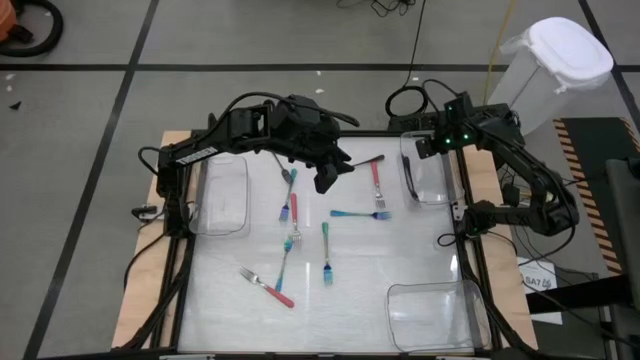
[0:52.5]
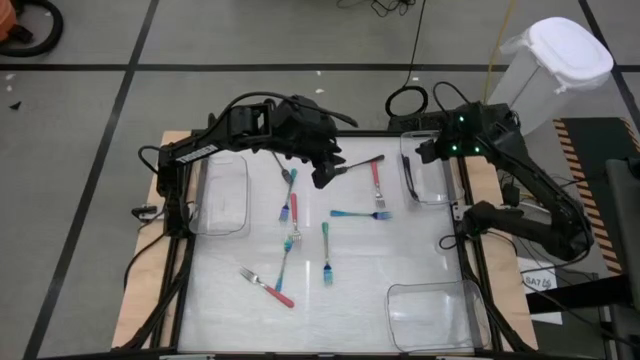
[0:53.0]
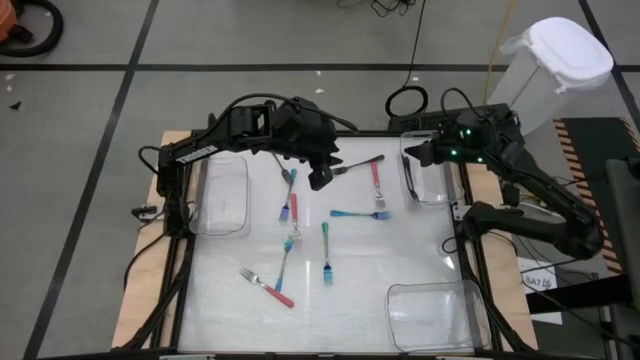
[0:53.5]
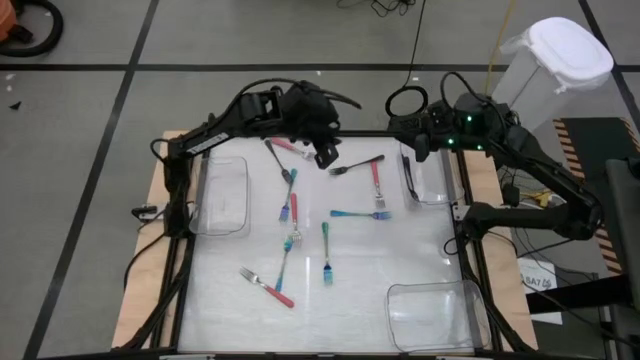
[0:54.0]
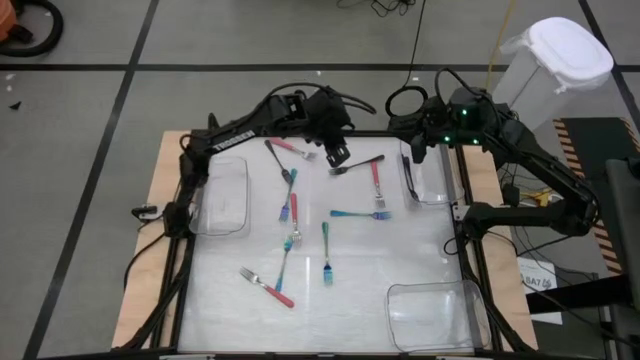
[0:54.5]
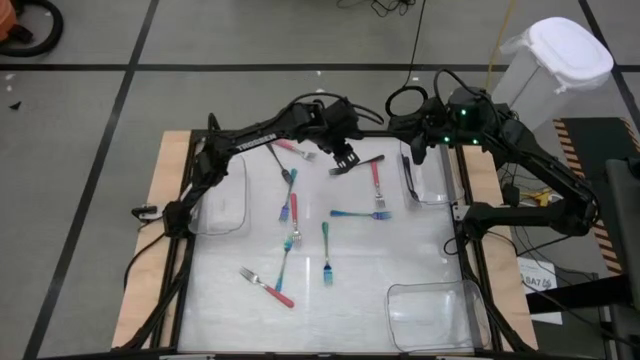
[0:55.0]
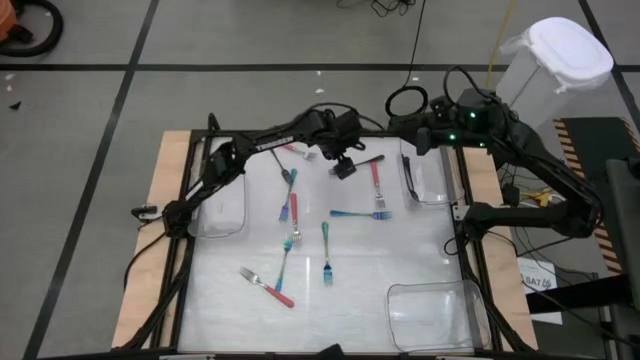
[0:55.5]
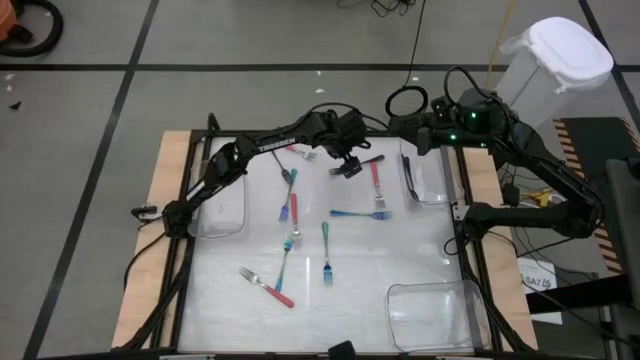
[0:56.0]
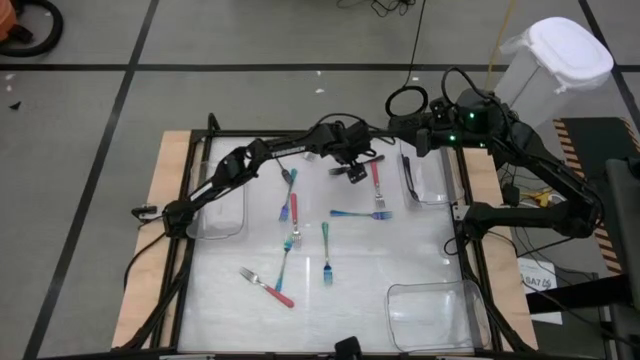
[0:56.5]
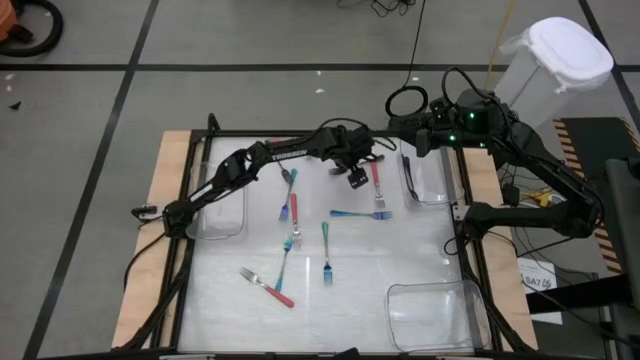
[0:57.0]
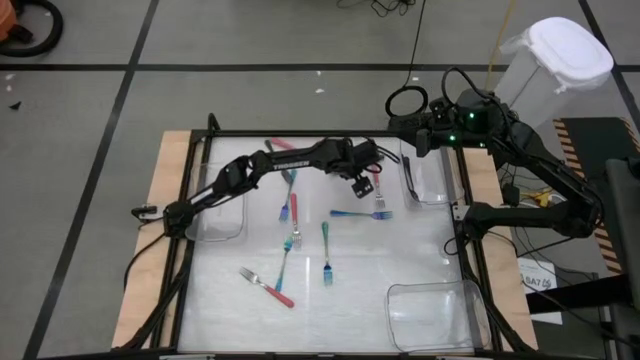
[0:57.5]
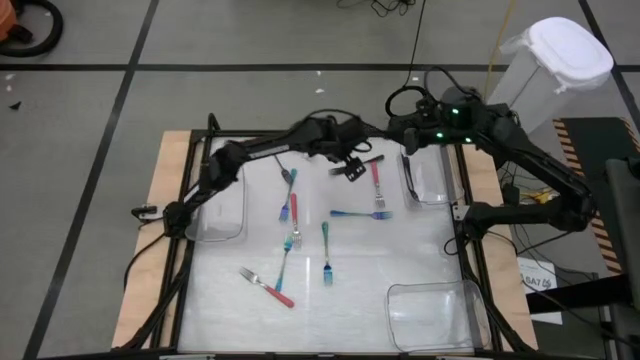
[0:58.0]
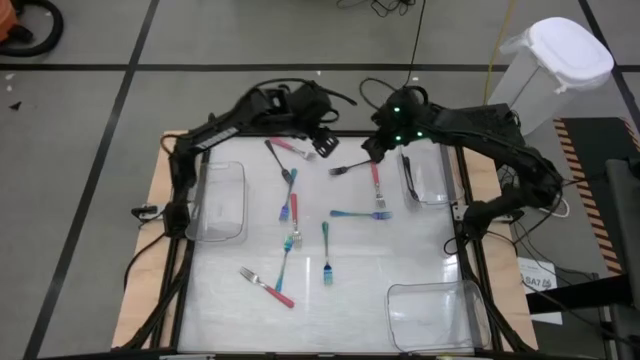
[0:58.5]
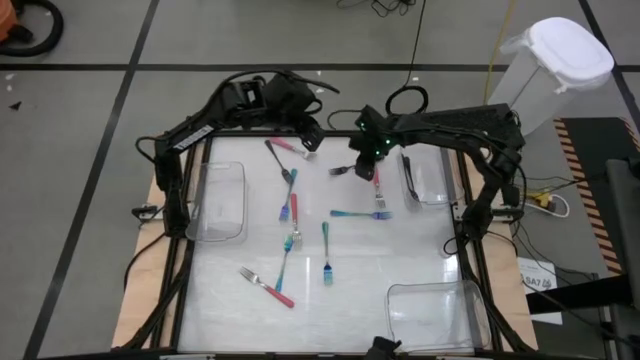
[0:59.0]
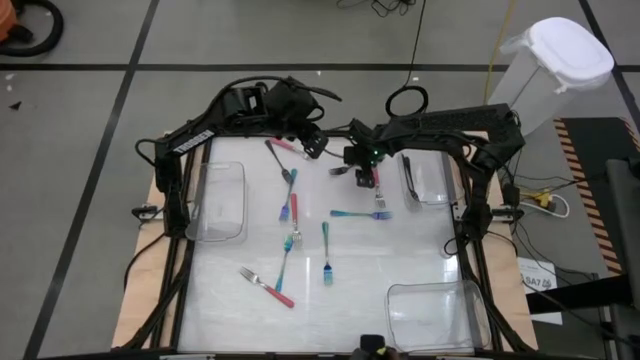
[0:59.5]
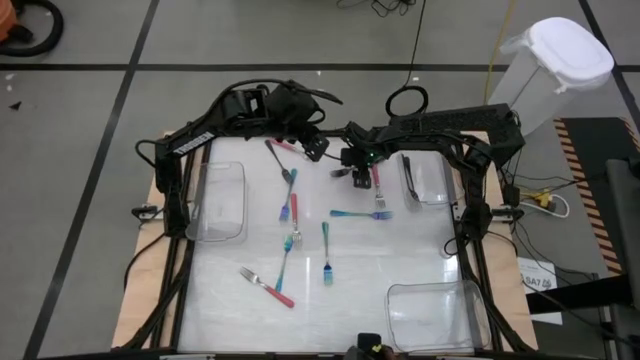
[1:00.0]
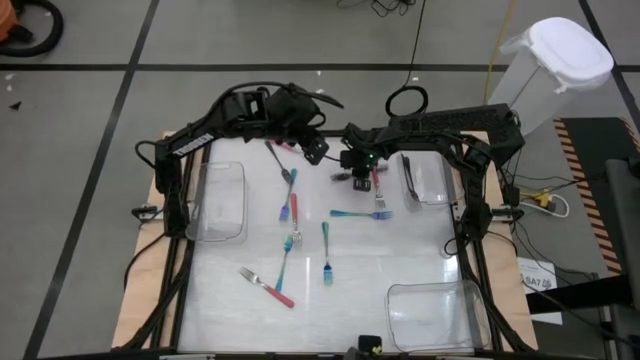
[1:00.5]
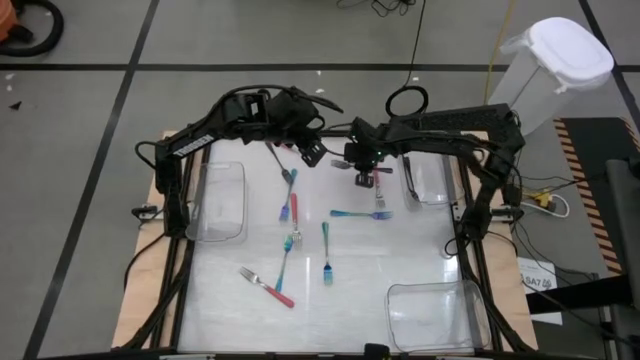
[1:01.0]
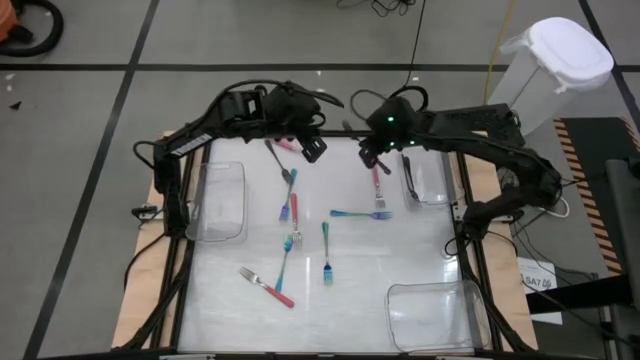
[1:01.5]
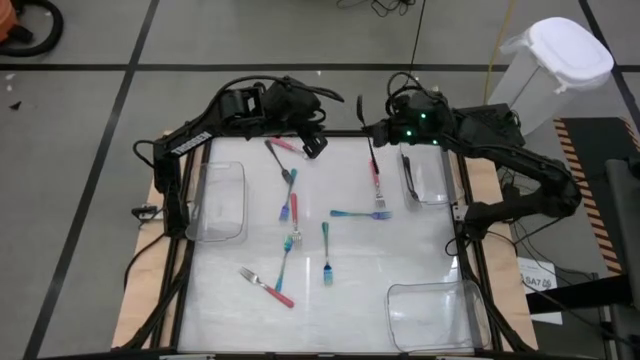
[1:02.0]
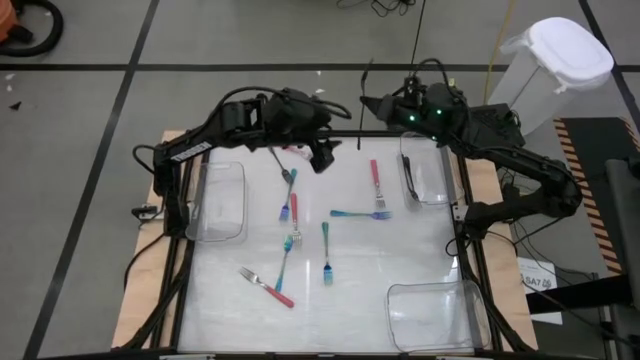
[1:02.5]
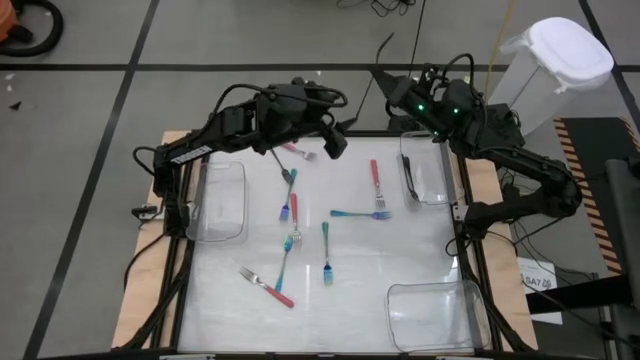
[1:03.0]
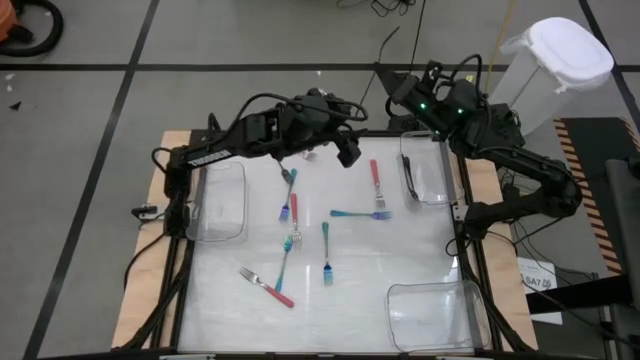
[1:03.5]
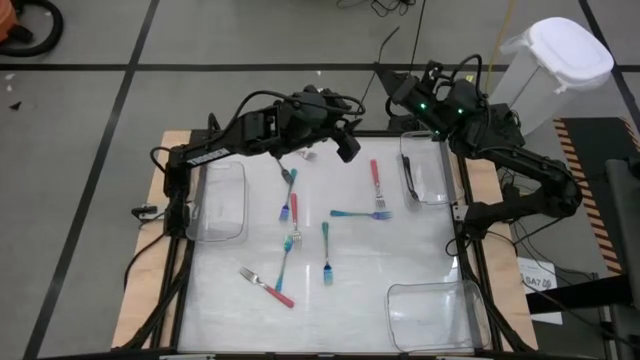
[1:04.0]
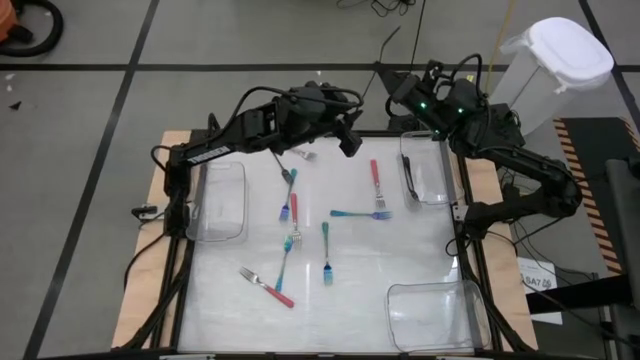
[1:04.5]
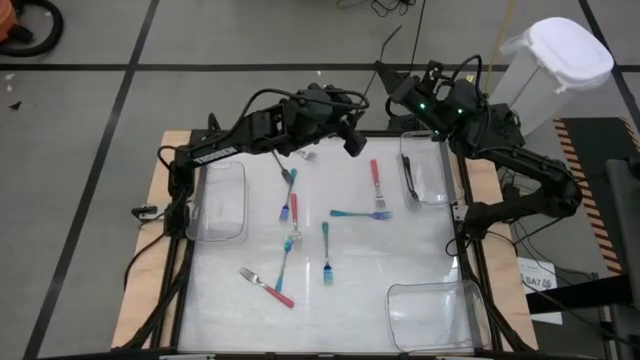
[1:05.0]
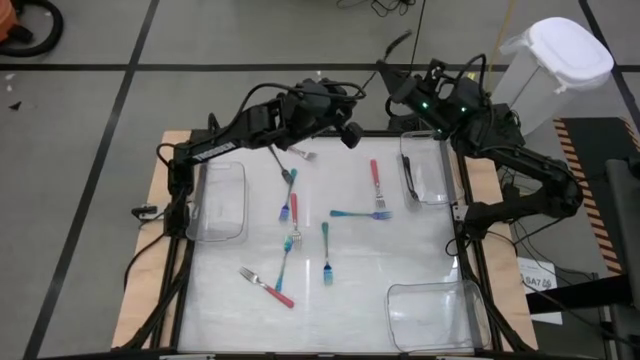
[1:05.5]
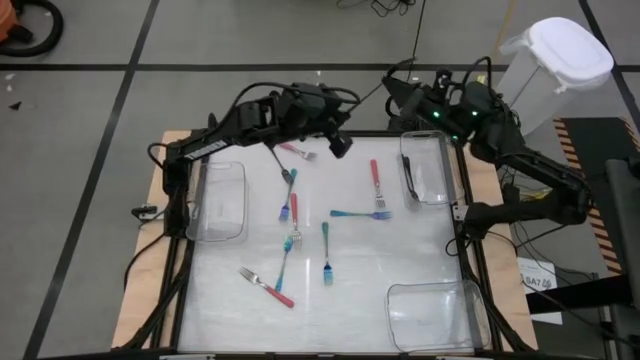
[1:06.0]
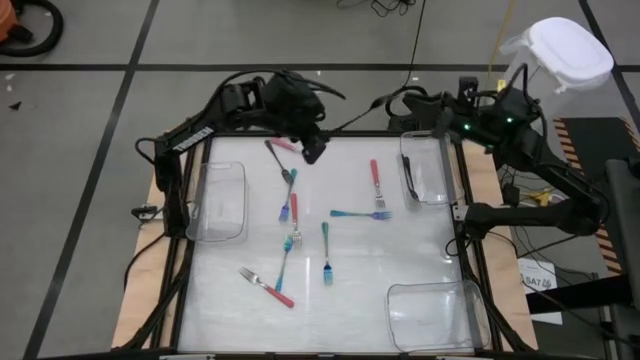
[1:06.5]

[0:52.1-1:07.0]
Task: Sort silverware by color (type)
Put the black fork into the top right transparent bin

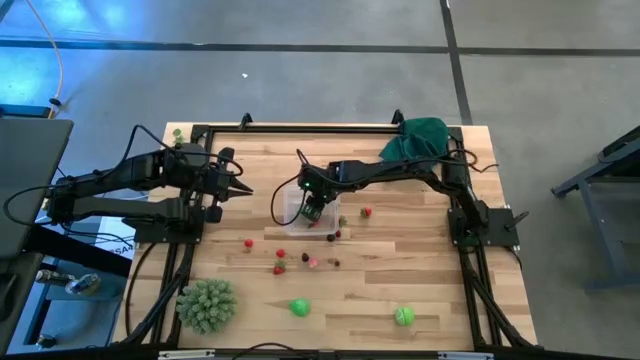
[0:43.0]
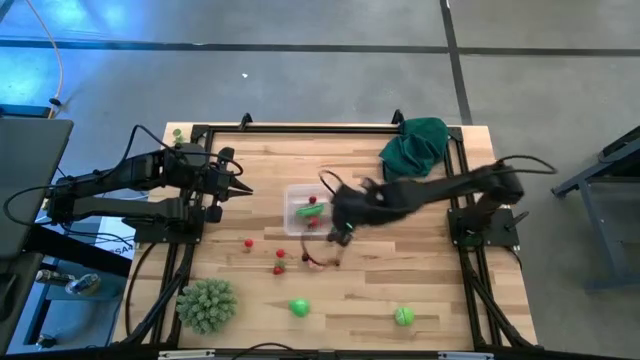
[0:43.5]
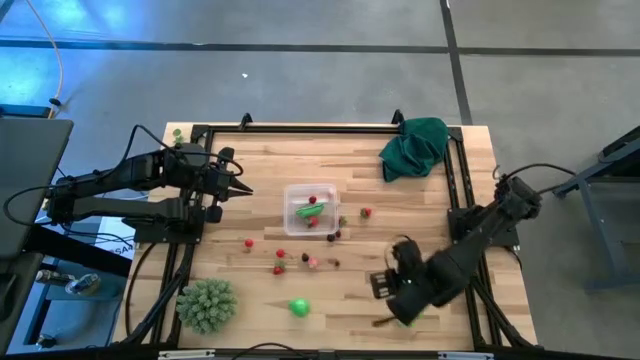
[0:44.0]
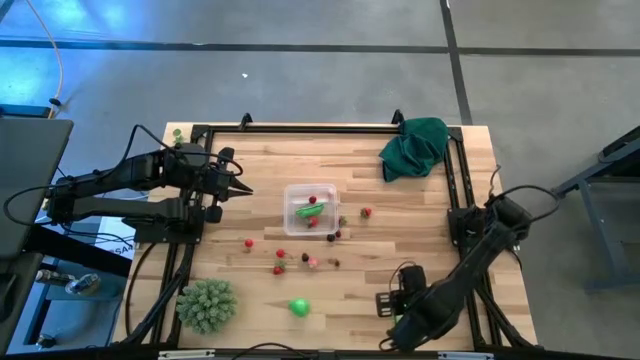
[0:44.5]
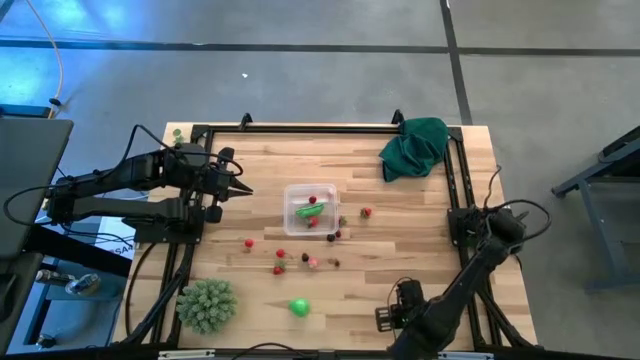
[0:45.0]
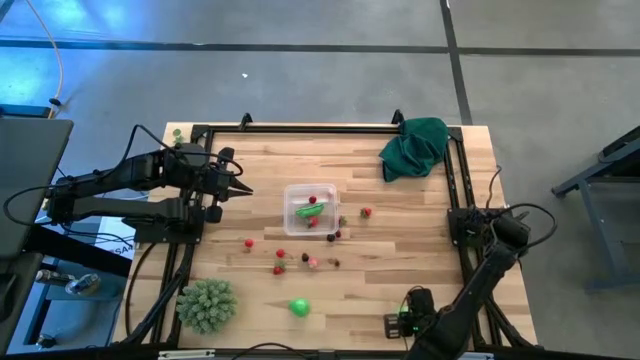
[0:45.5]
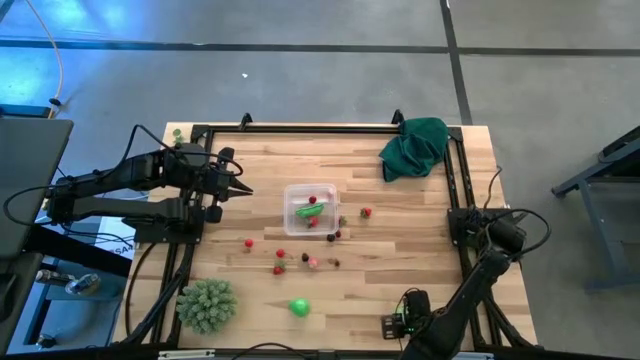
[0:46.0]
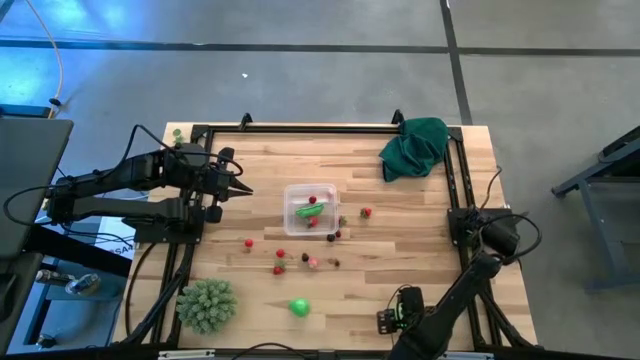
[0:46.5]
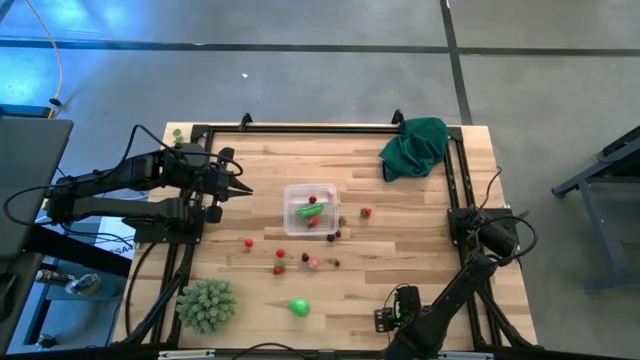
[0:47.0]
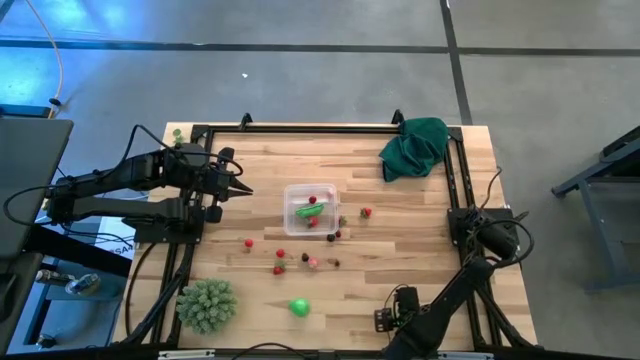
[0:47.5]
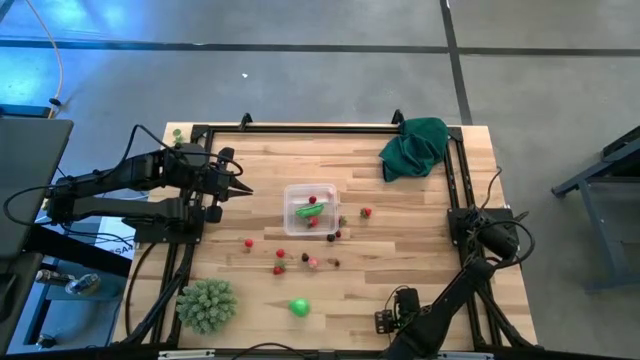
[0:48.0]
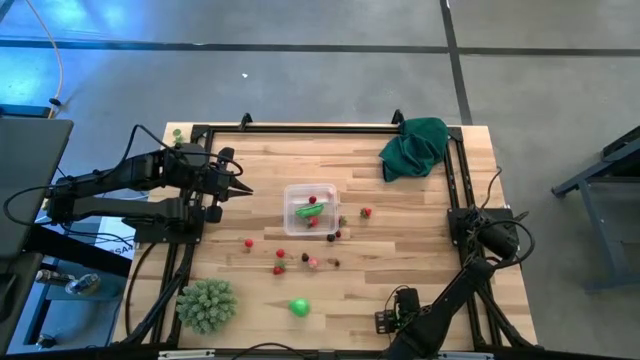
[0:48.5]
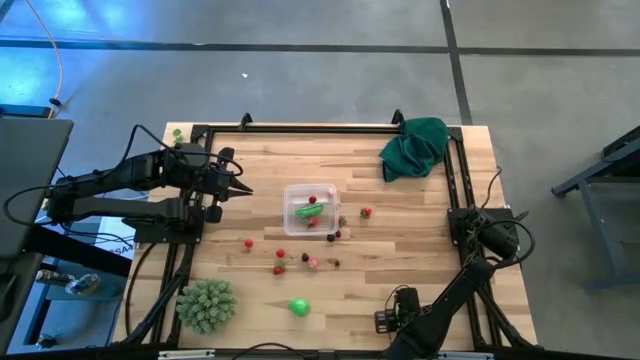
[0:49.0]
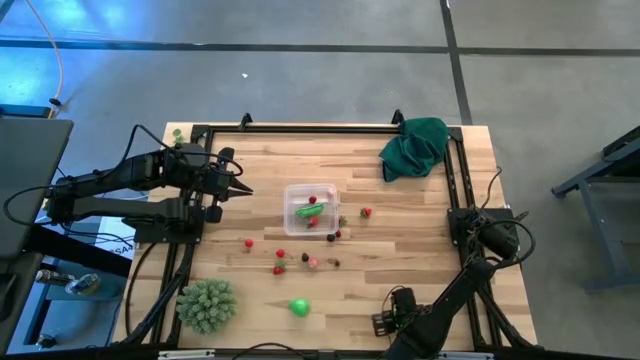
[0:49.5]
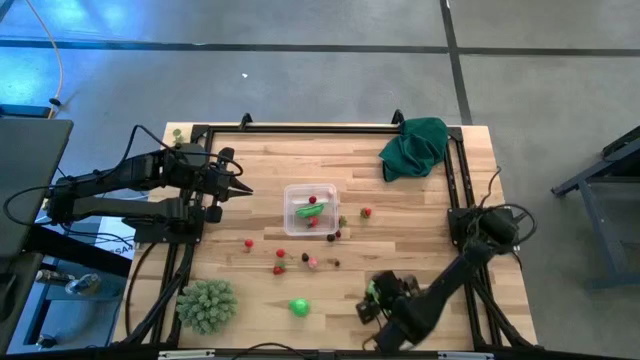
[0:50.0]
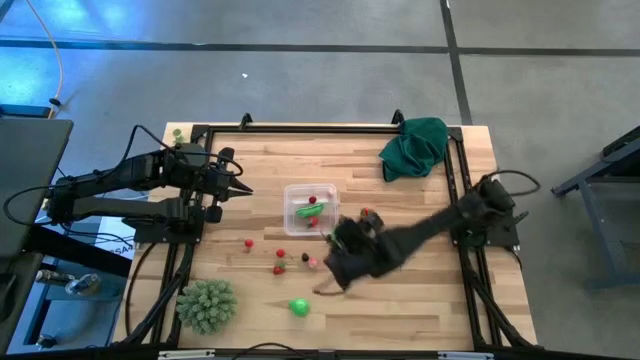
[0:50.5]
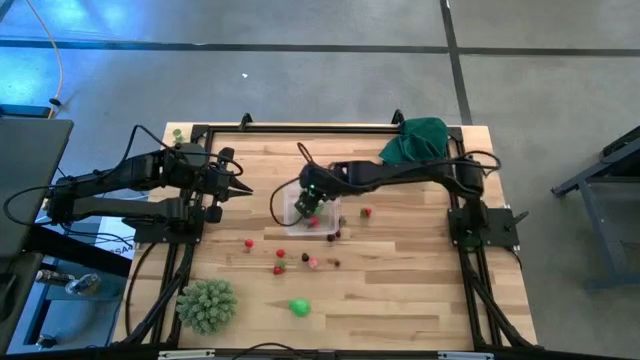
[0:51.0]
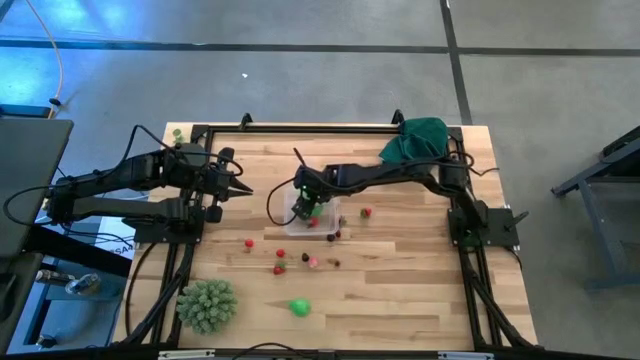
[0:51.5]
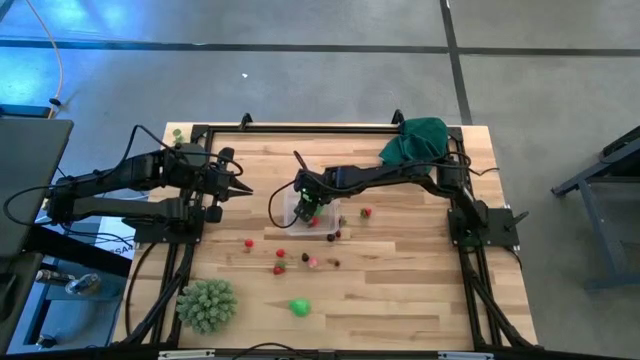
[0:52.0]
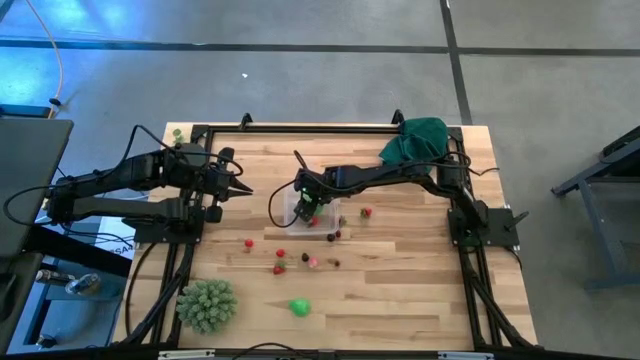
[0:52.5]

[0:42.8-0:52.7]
Task: Pick and placing Produce into tupperware
Put the green cabbage into the transparent container
